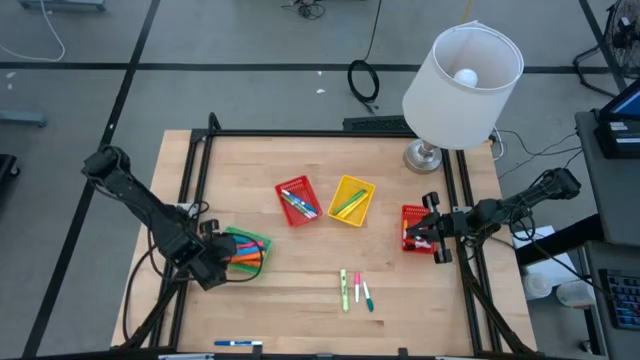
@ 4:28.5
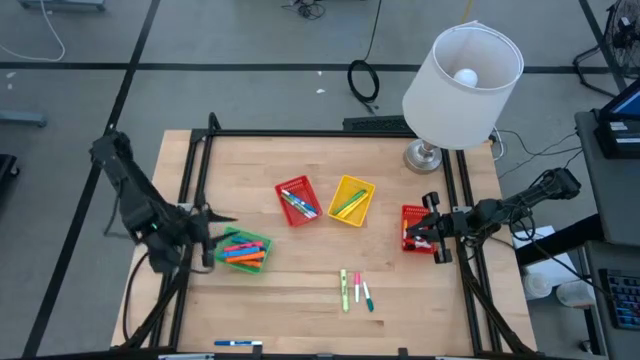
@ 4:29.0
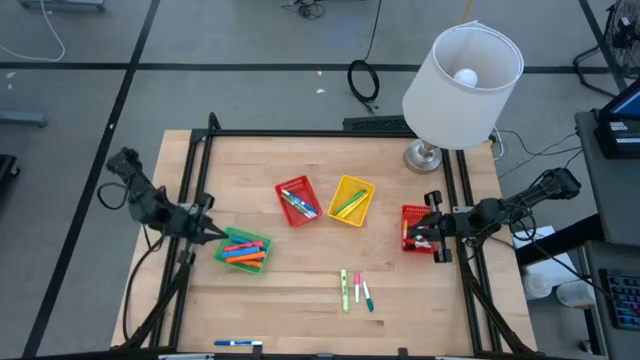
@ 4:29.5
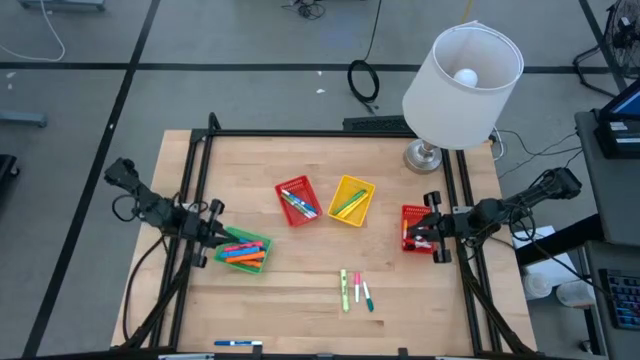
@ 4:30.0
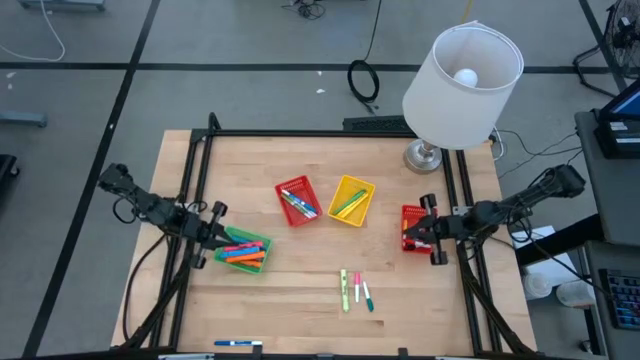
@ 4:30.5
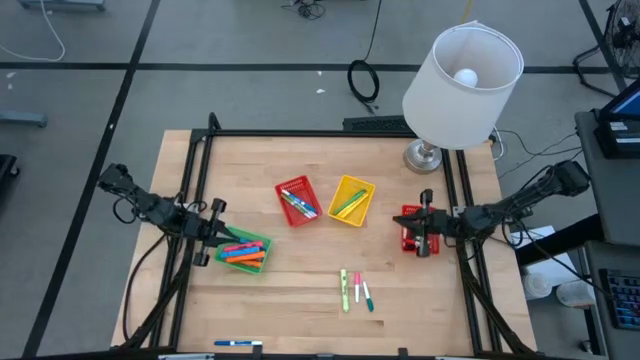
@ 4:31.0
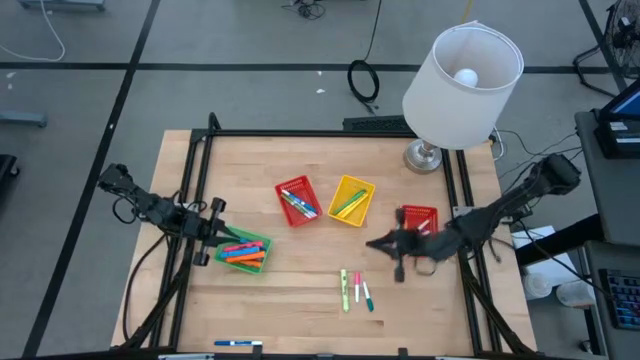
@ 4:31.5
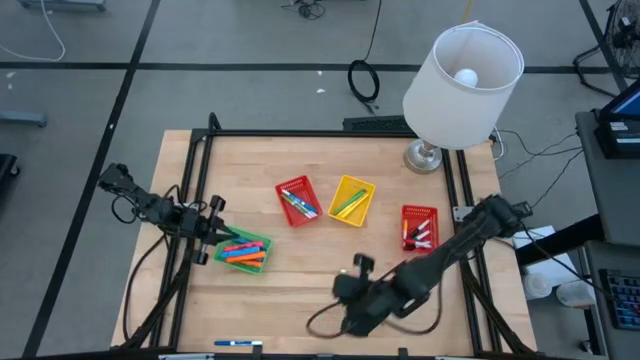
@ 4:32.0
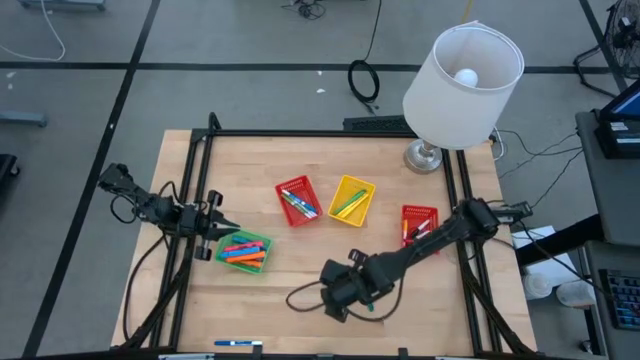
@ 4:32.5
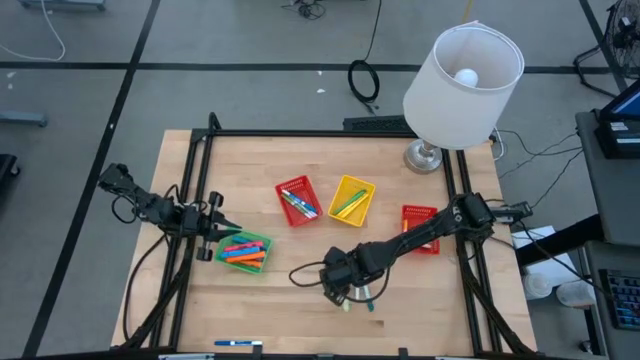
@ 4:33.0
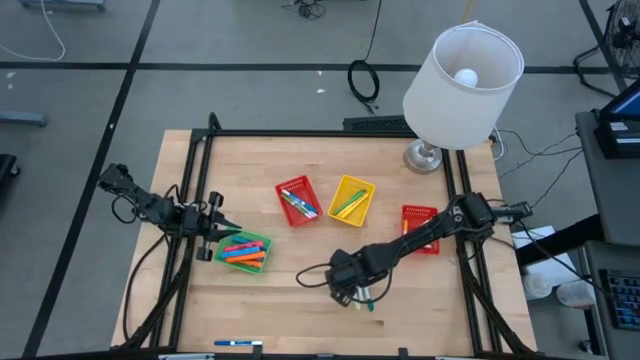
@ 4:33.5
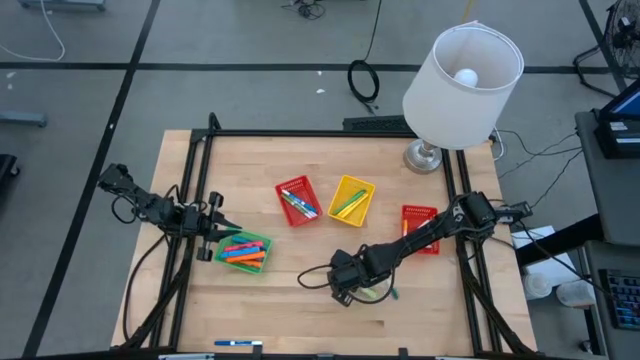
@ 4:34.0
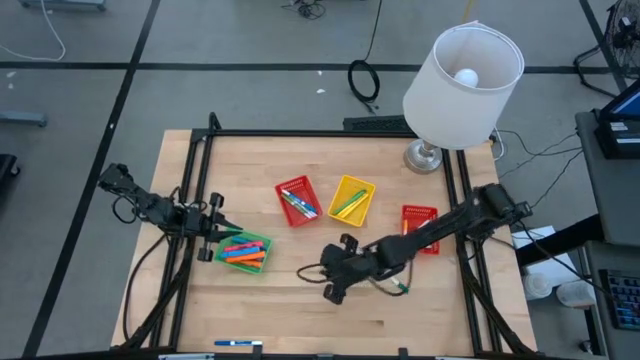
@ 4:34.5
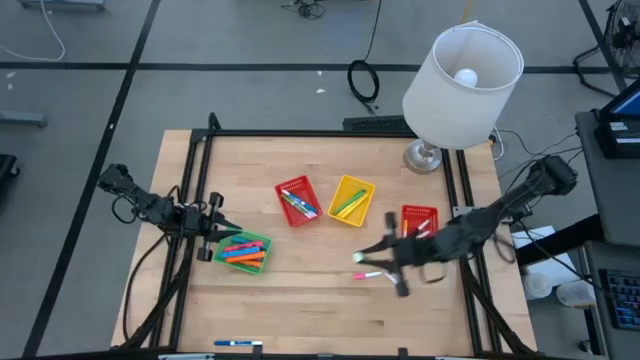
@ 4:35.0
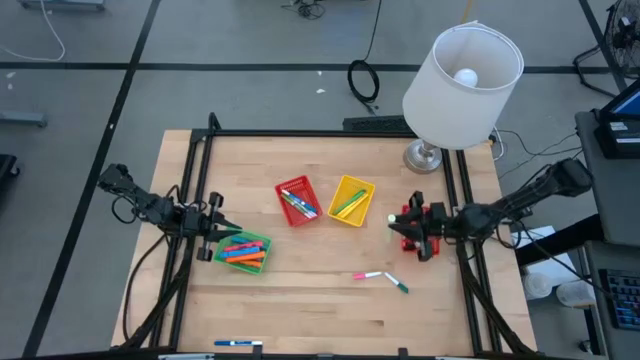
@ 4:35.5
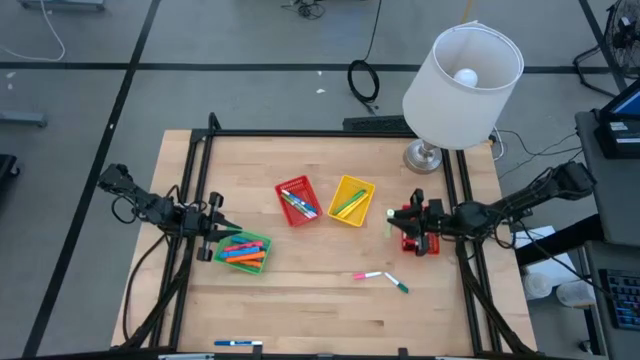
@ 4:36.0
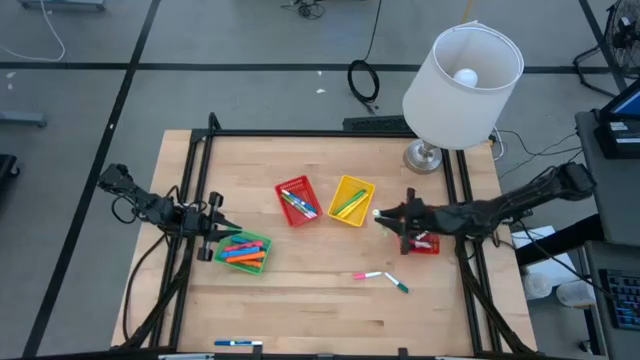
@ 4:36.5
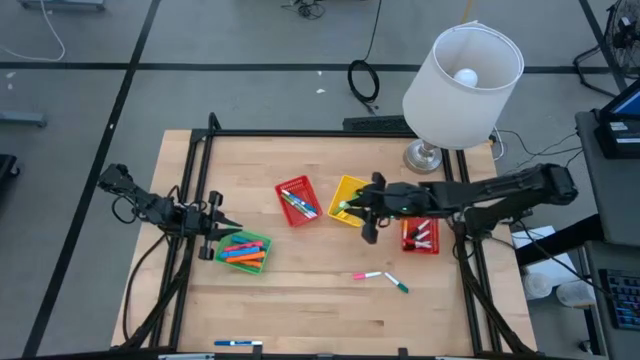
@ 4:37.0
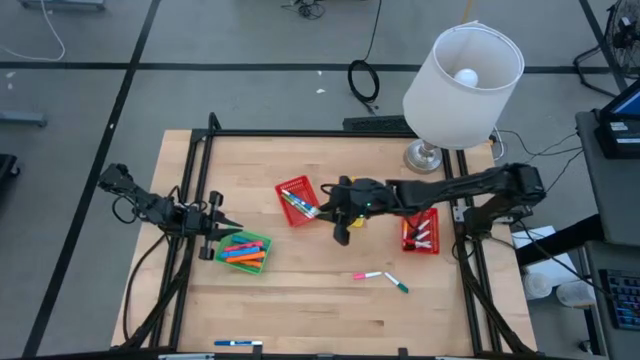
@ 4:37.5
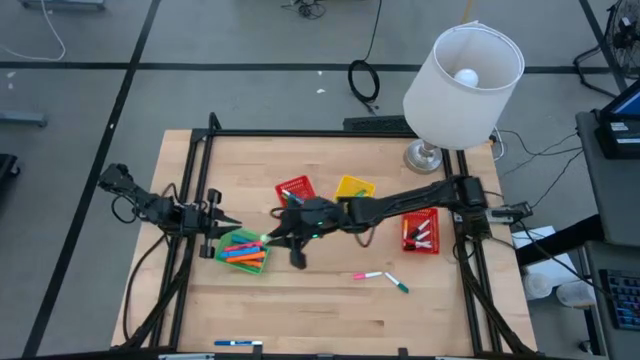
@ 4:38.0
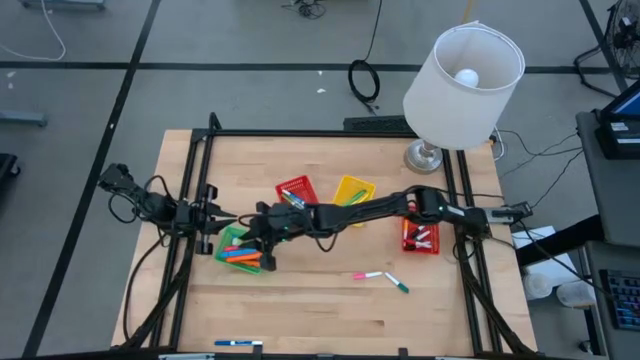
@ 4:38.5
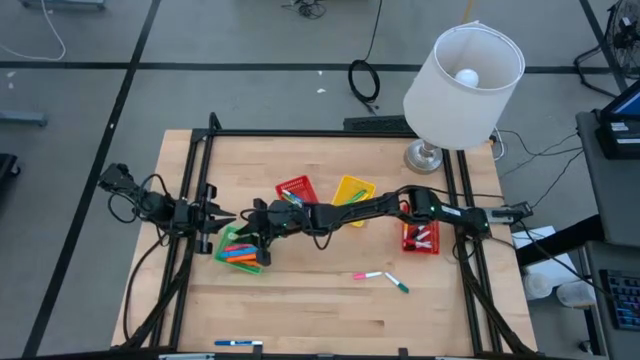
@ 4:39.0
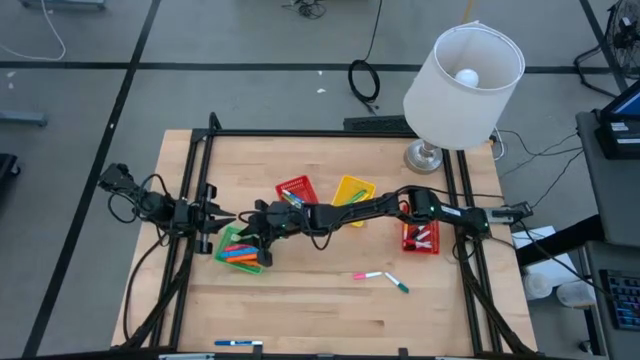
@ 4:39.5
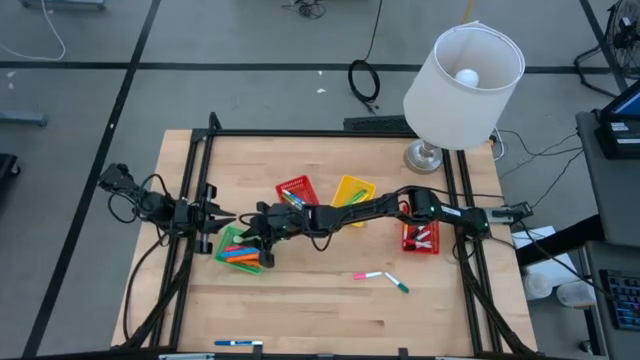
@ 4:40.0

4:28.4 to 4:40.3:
Task: Pick & Place Markers
Put the light green highlighter into the green bin

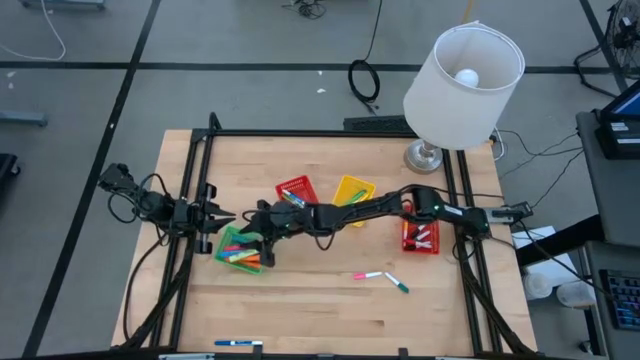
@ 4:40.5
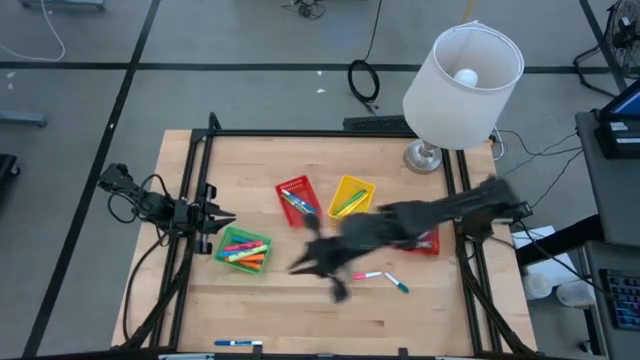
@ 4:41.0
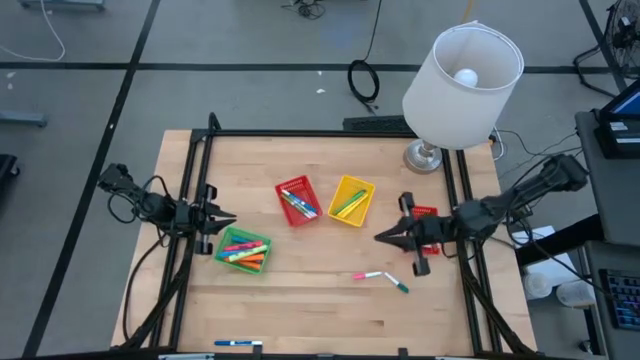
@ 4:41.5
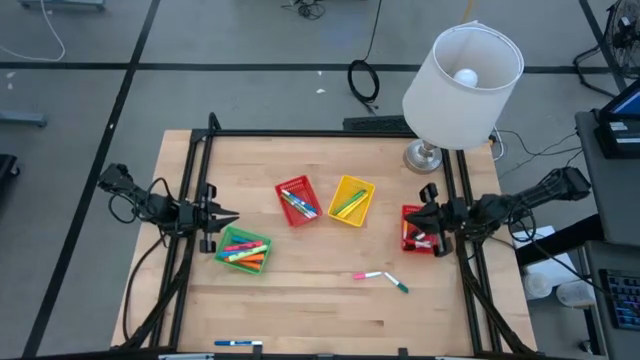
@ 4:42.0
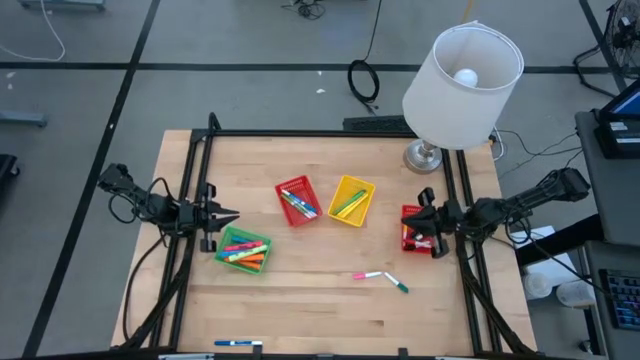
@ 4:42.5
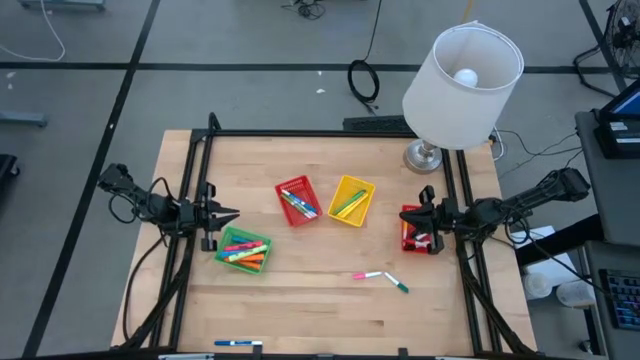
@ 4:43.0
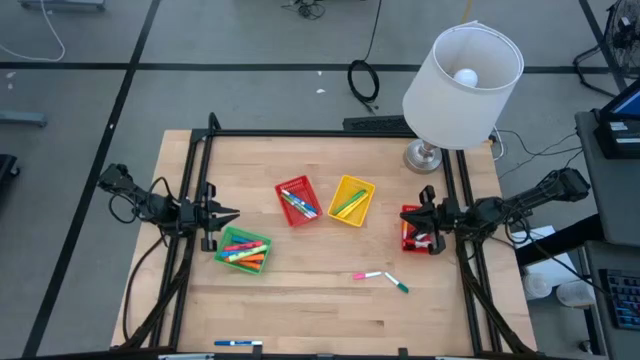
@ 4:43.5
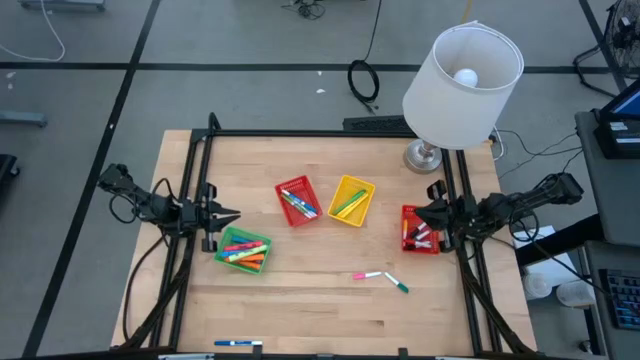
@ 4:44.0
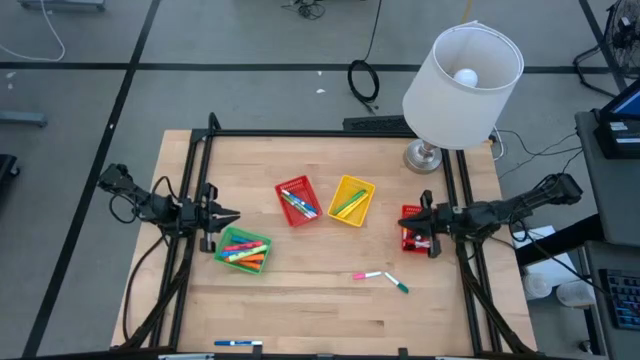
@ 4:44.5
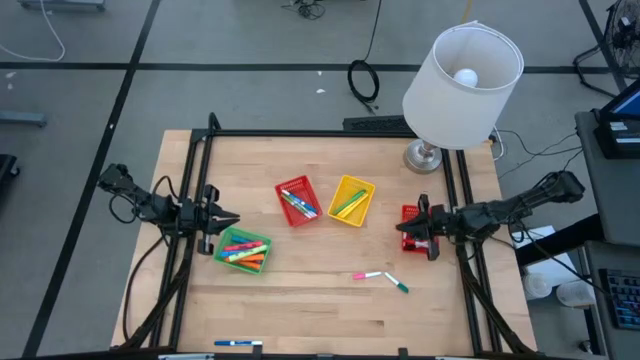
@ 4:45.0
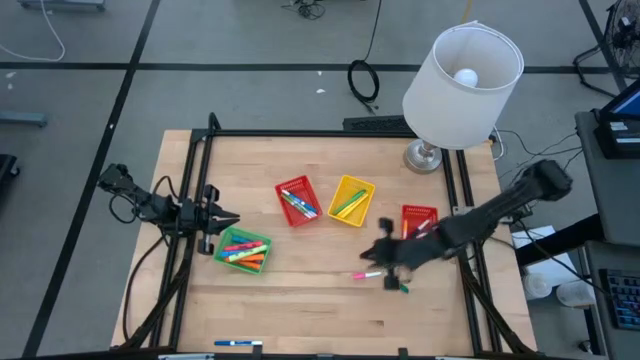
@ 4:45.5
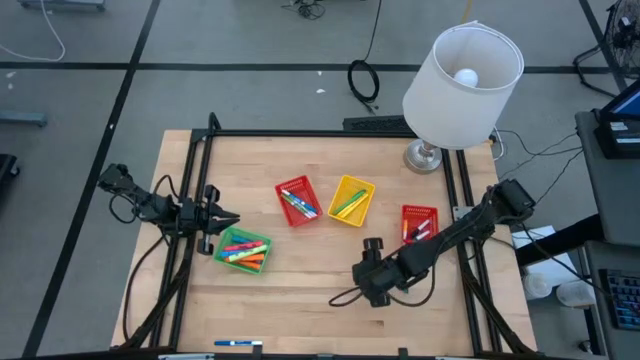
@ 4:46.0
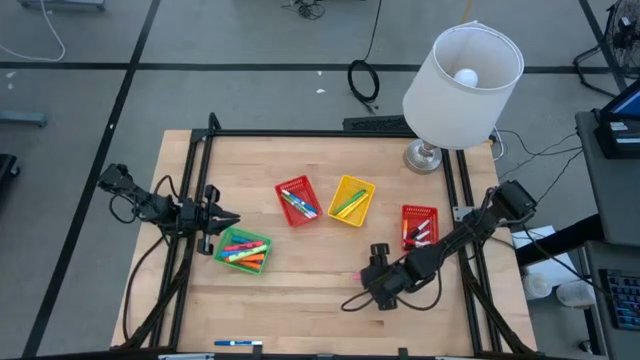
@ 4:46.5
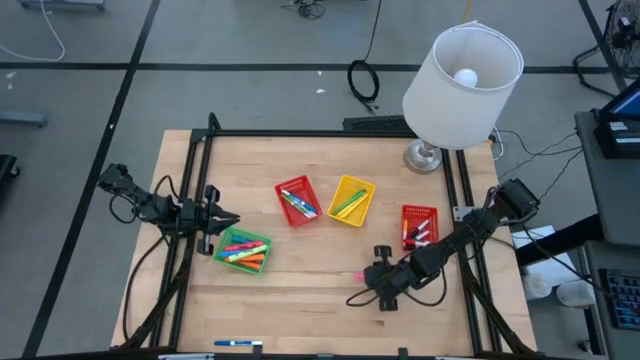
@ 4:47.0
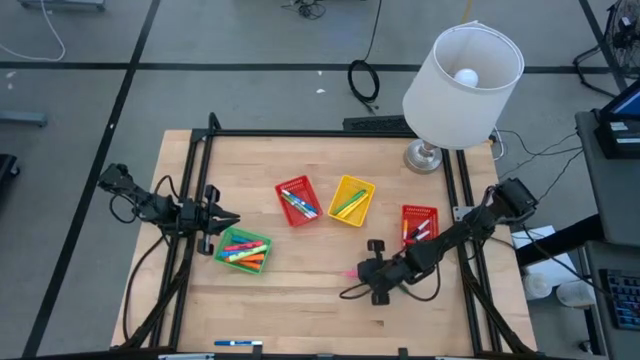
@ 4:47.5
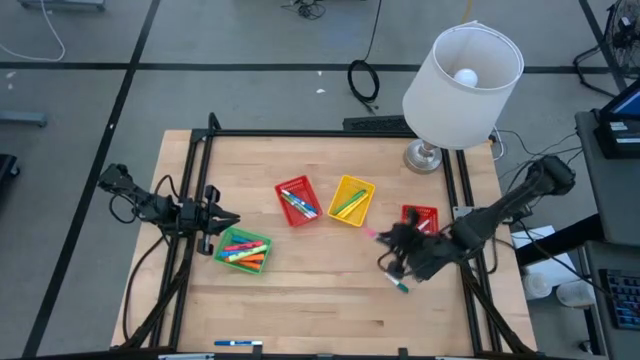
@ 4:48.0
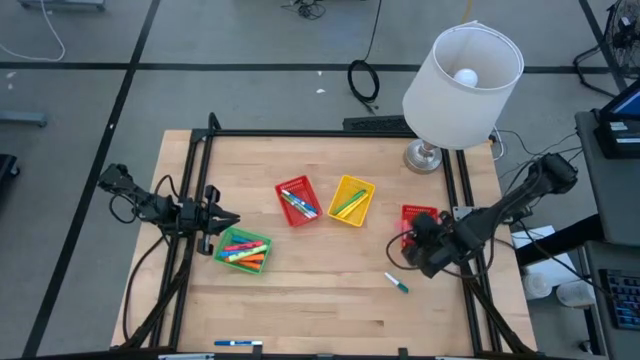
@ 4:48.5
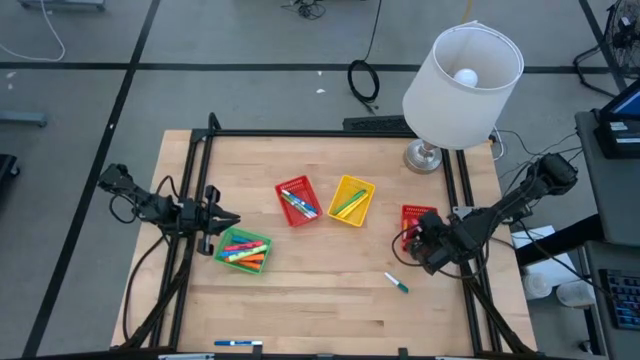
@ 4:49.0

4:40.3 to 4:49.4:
Put the pink marker into the right red bin

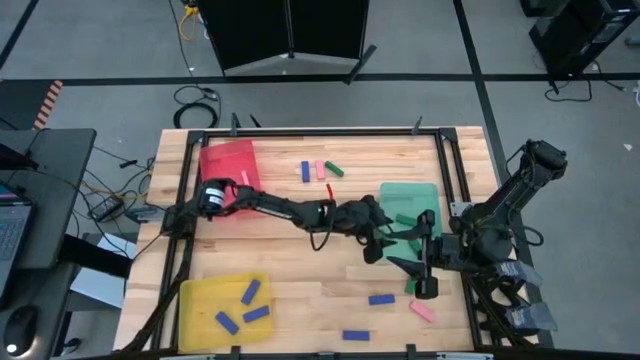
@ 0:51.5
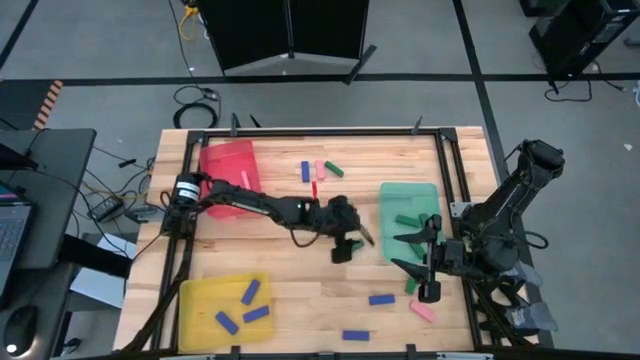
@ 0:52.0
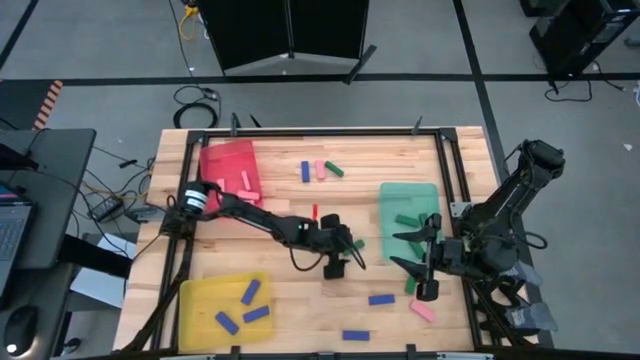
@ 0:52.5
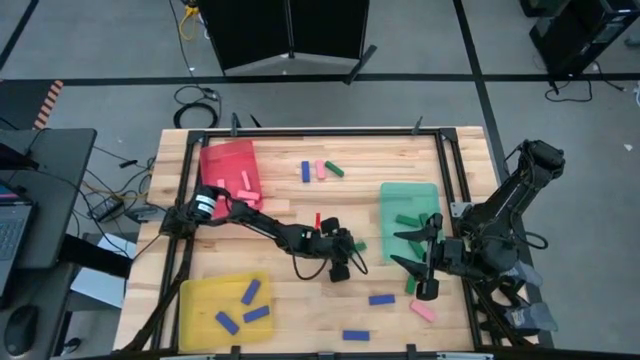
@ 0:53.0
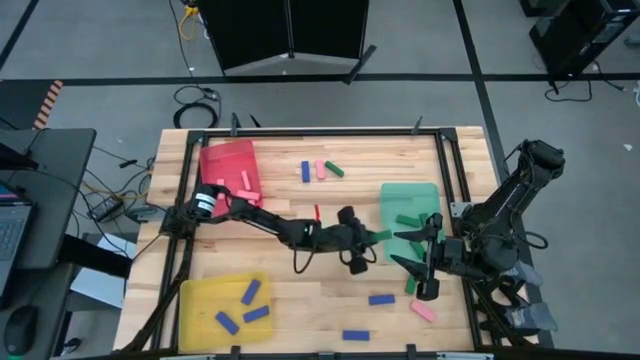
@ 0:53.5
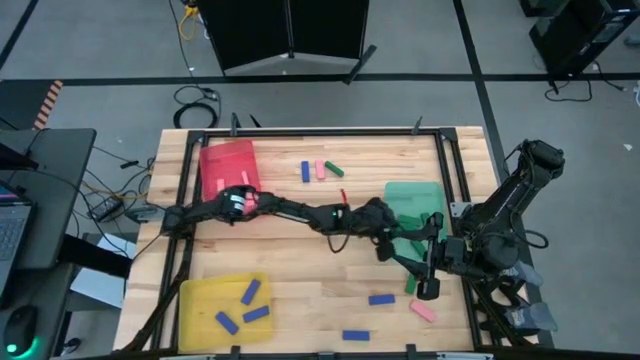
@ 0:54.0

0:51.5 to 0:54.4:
Task: Sort blocks
Put the green block into the blue bin
